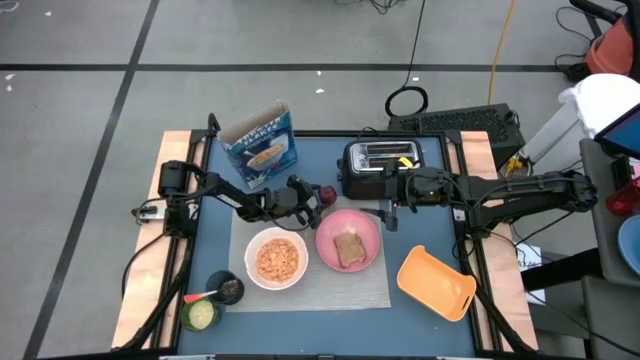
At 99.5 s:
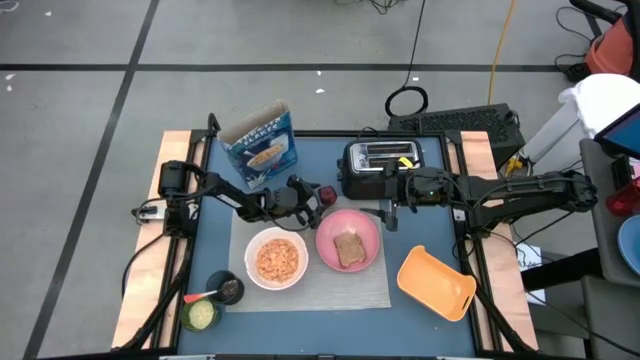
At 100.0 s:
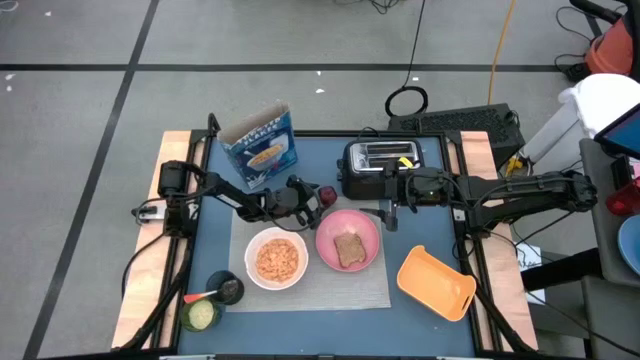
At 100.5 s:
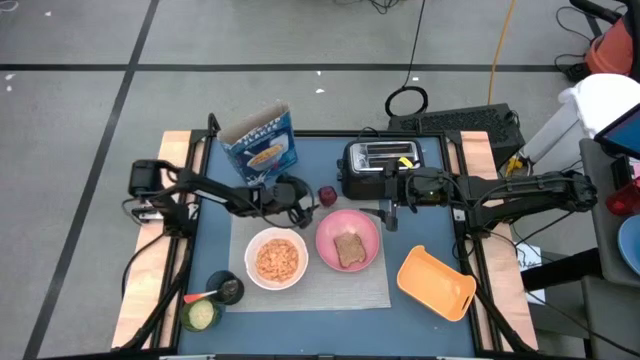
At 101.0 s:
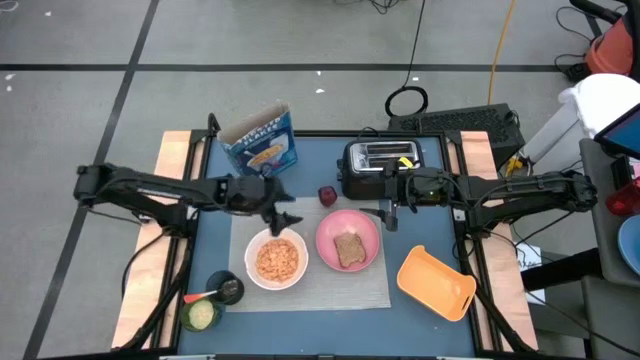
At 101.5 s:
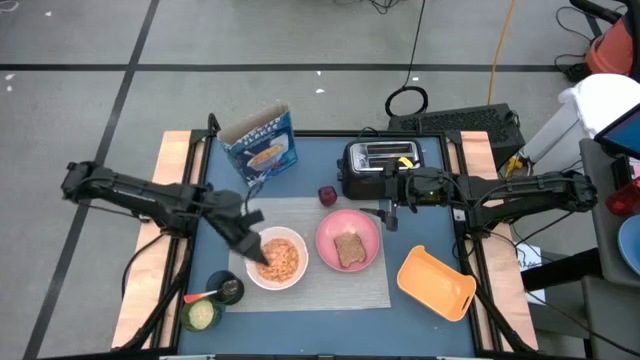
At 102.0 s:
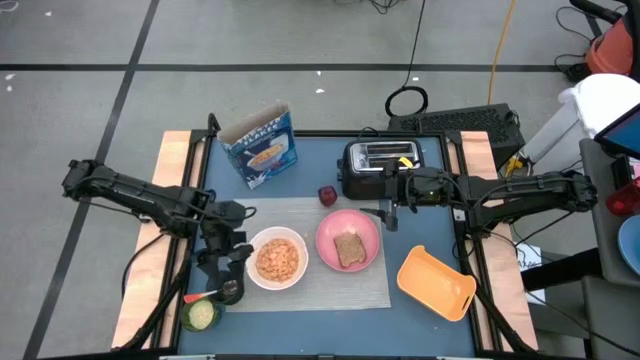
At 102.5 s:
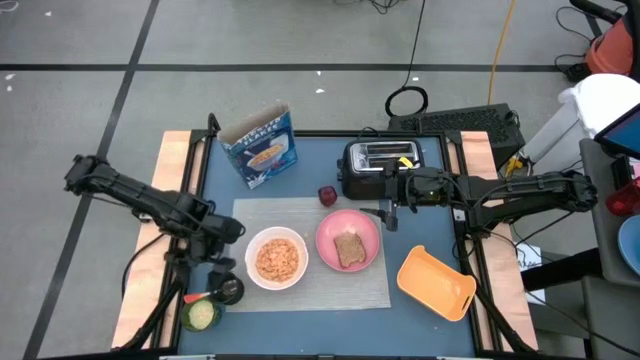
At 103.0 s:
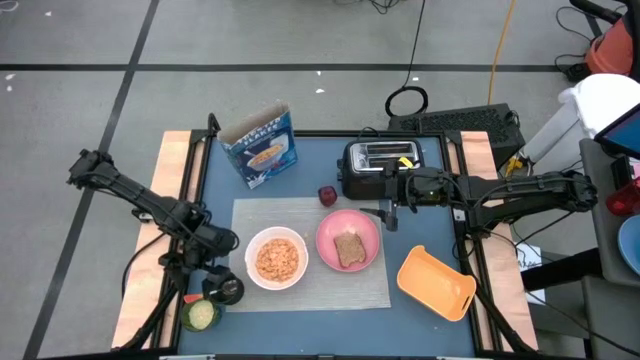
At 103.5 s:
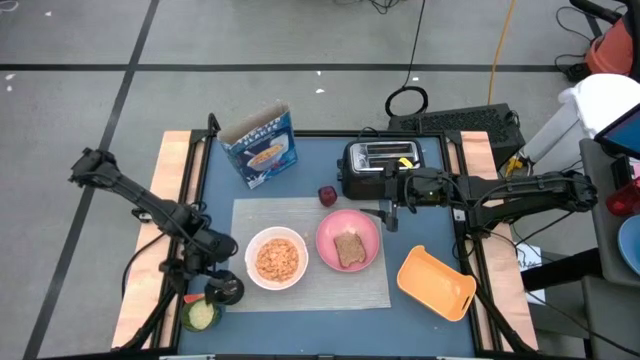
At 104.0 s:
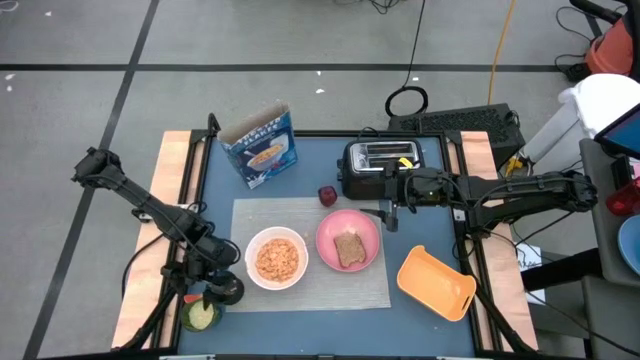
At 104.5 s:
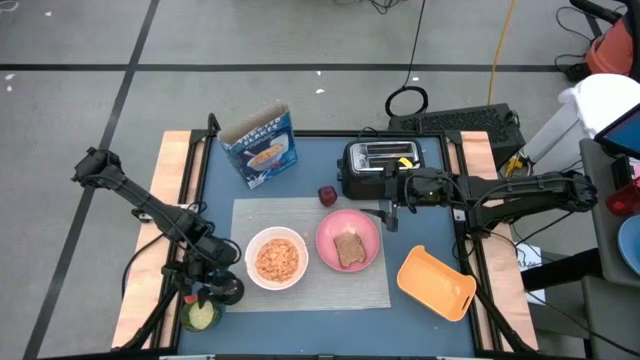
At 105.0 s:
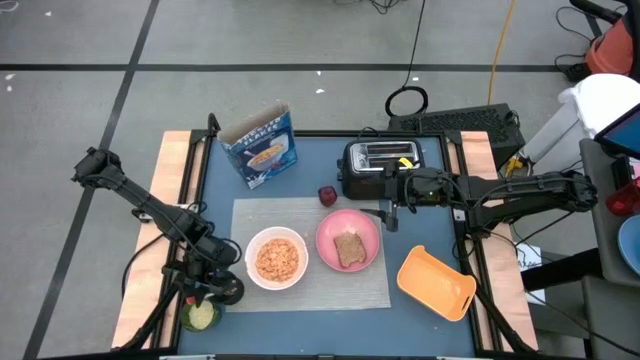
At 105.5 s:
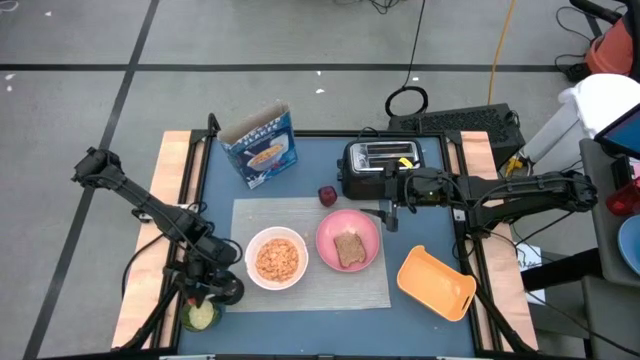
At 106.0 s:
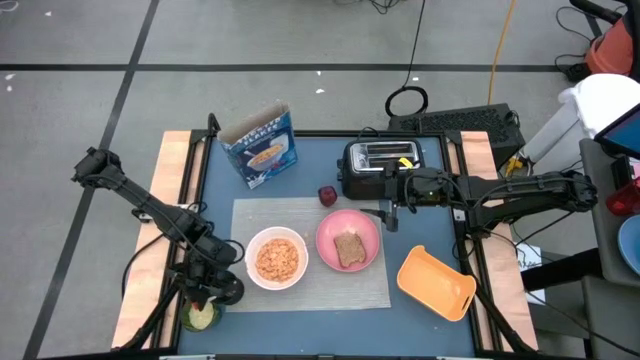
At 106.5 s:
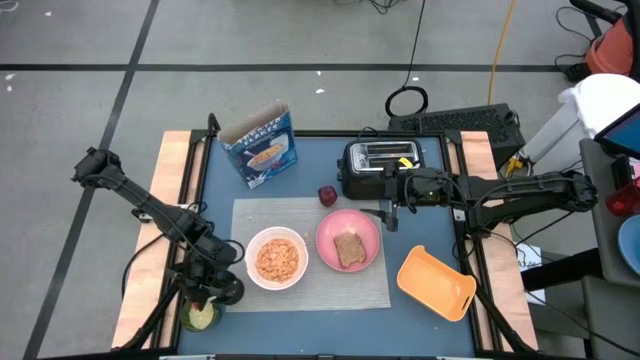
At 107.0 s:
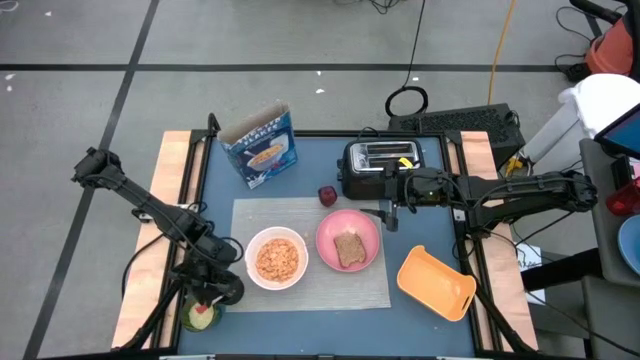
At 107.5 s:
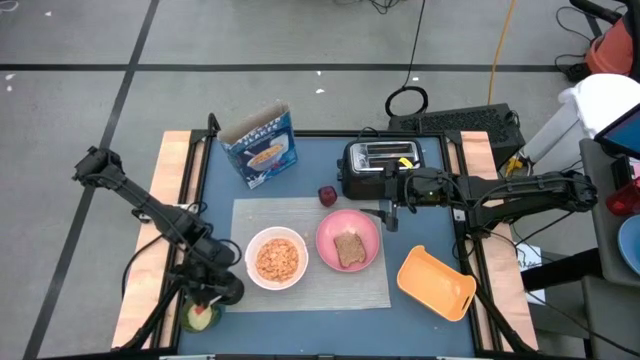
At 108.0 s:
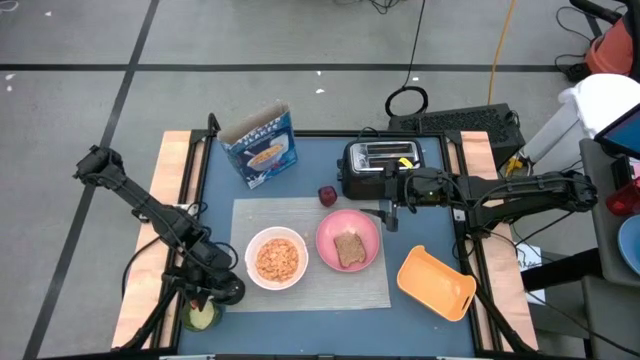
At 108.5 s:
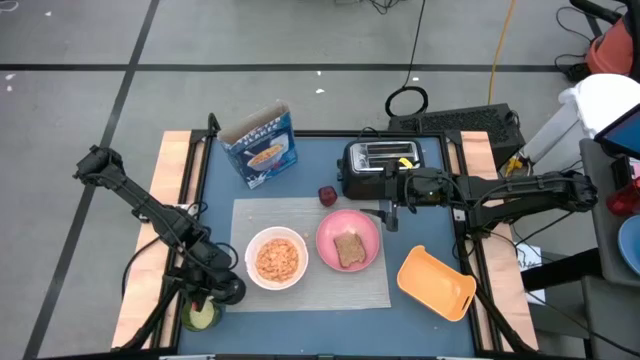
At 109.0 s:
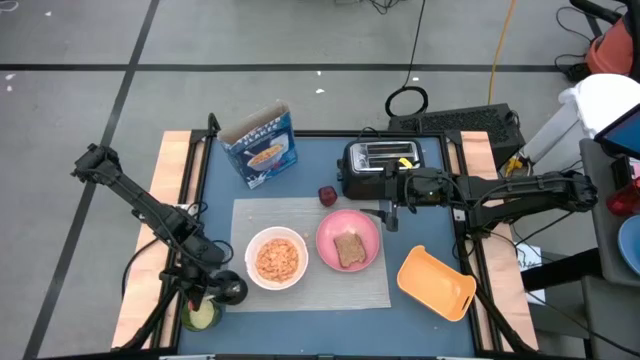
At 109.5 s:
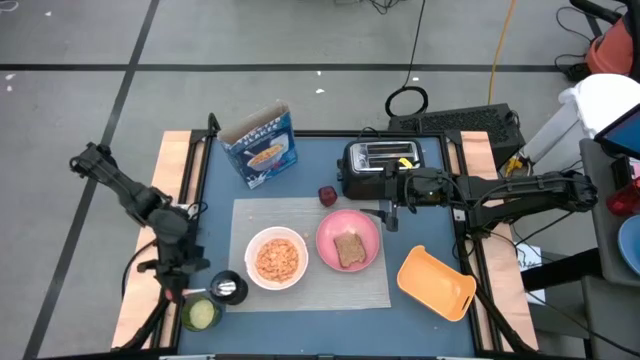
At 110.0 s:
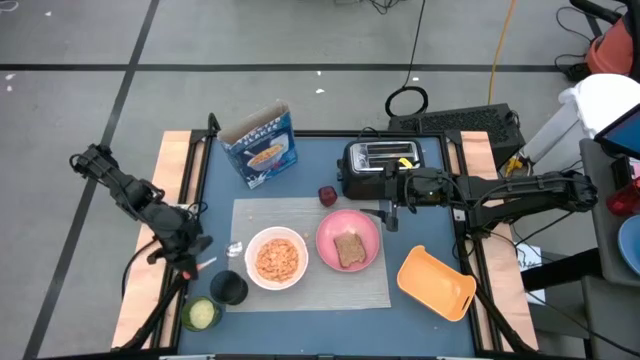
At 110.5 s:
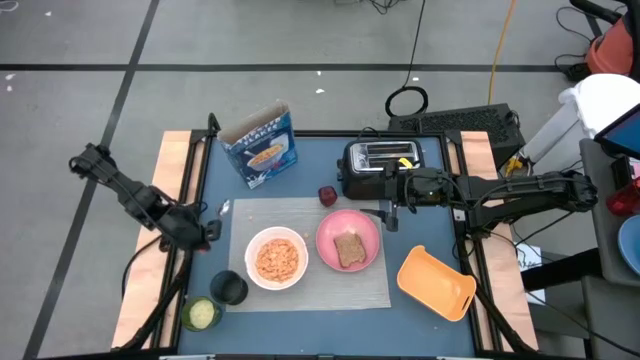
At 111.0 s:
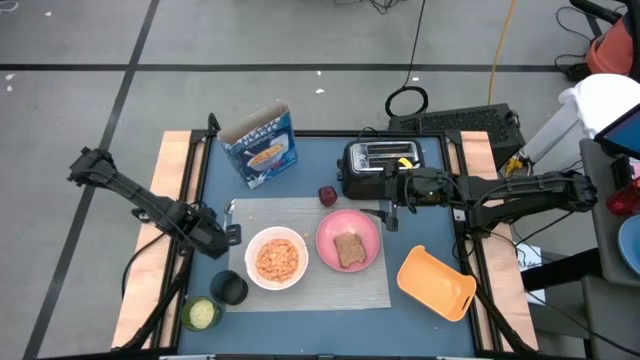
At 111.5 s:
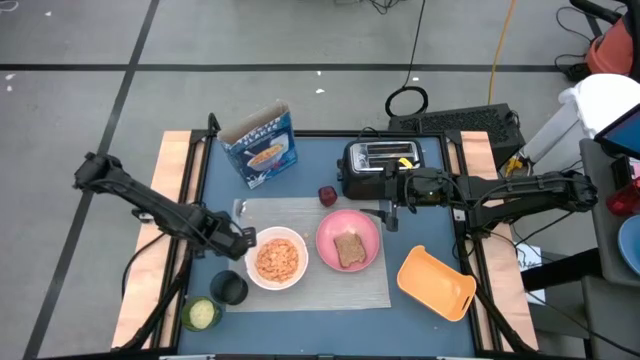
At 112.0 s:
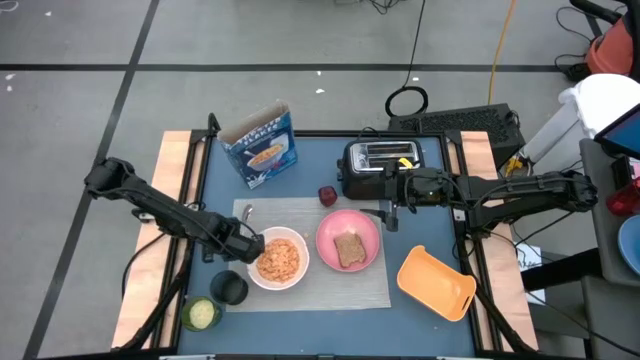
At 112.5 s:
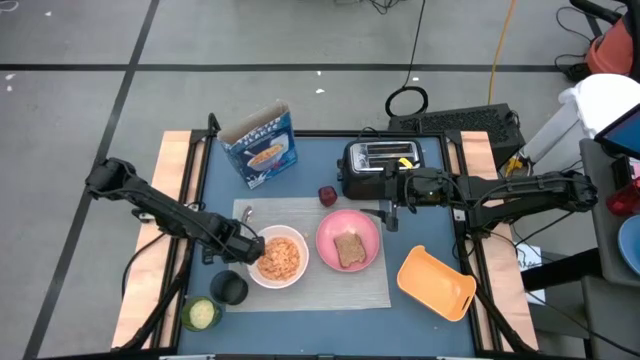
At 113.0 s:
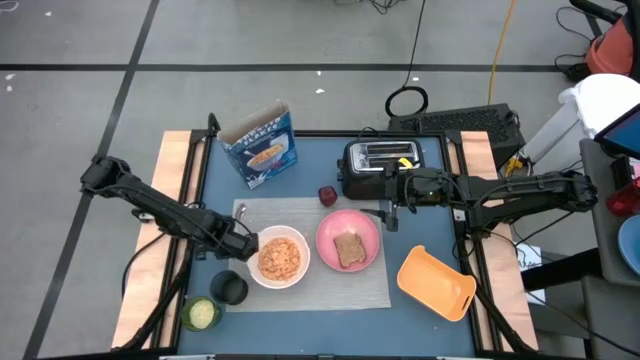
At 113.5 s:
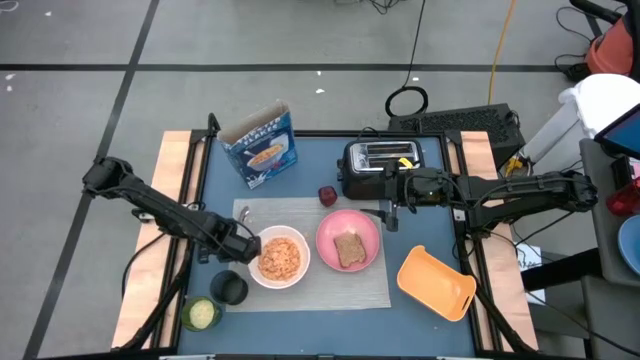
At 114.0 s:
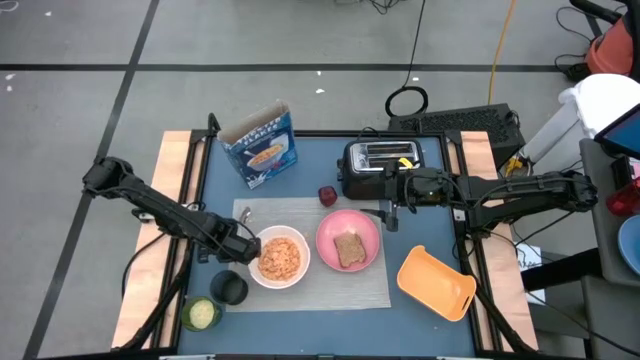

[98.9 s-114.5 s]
Task: Arrange a breakfast setting
Put the orange spoon on the mat

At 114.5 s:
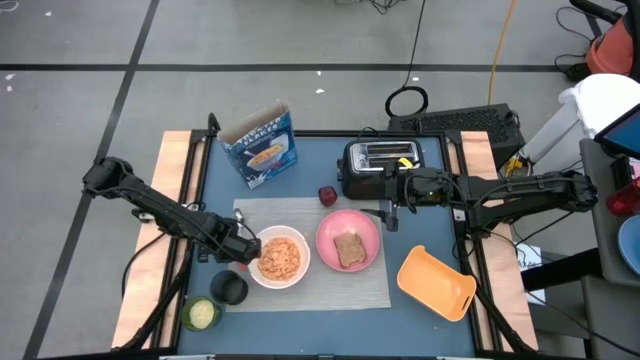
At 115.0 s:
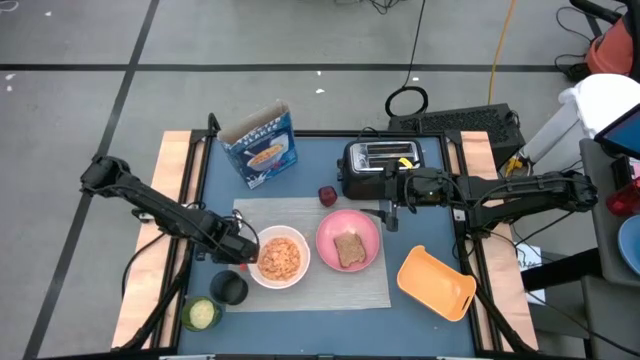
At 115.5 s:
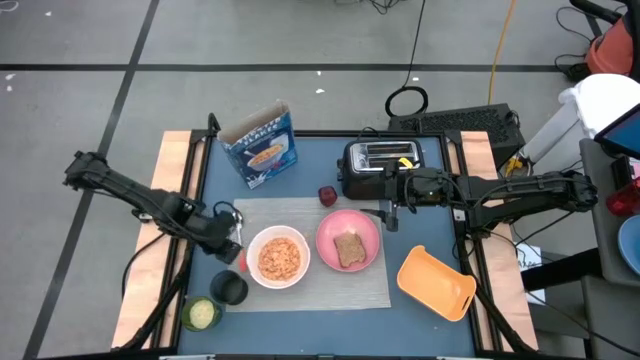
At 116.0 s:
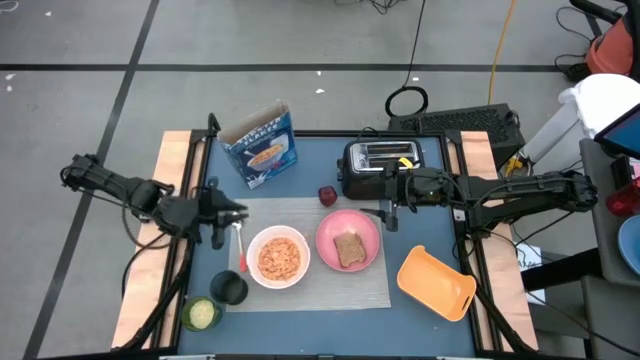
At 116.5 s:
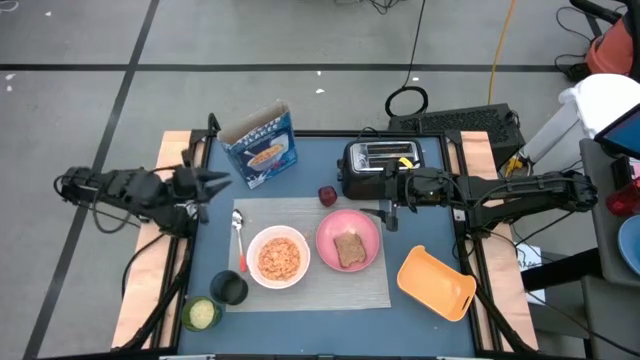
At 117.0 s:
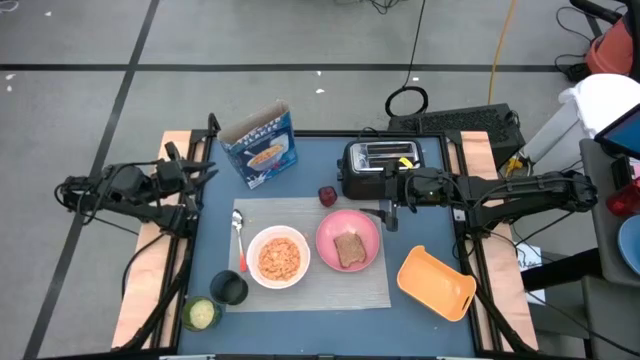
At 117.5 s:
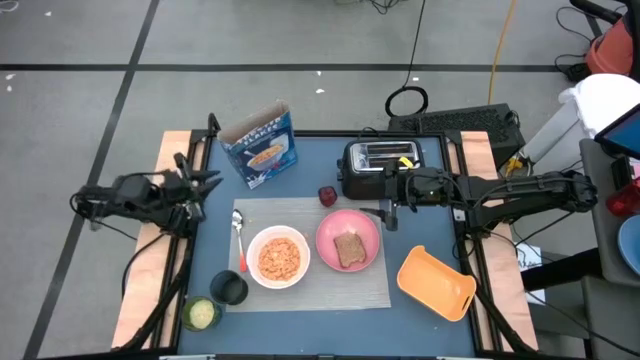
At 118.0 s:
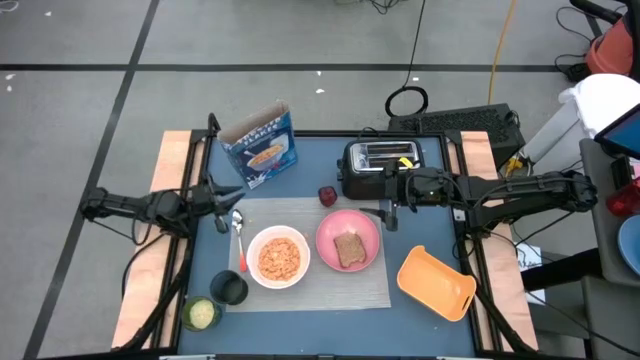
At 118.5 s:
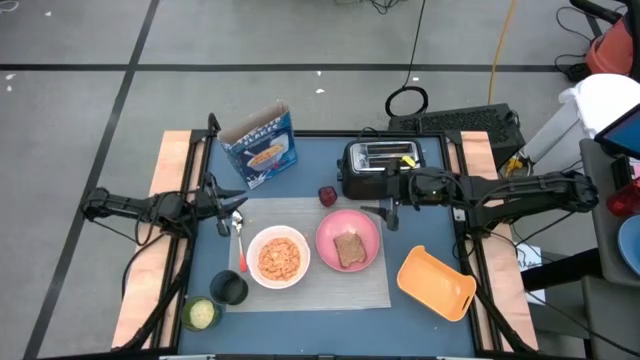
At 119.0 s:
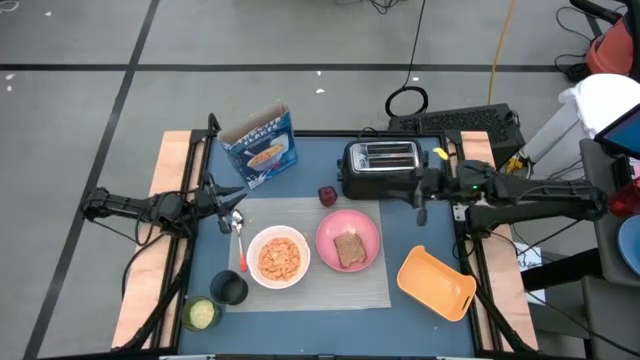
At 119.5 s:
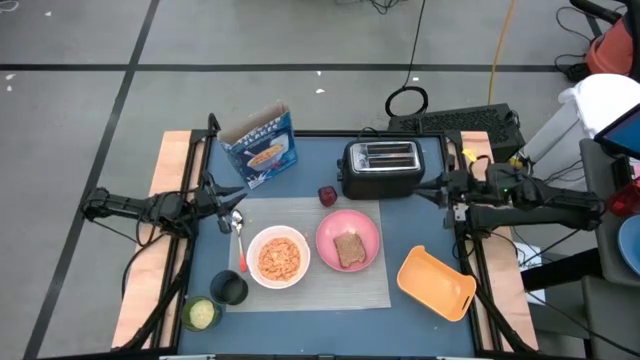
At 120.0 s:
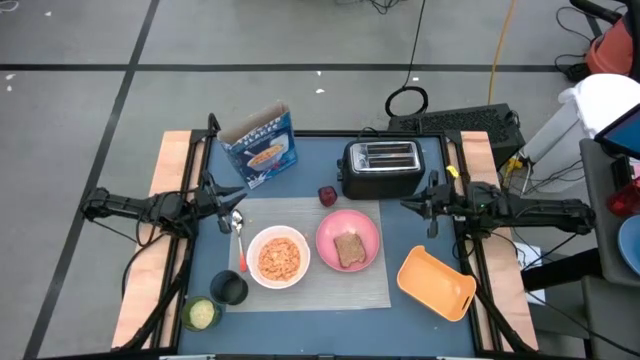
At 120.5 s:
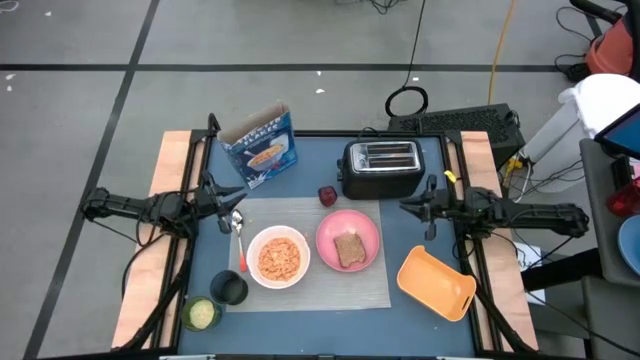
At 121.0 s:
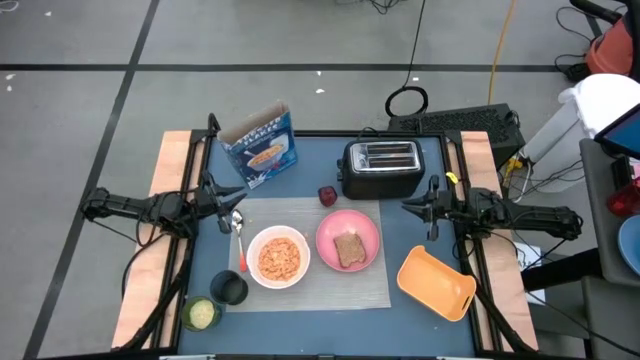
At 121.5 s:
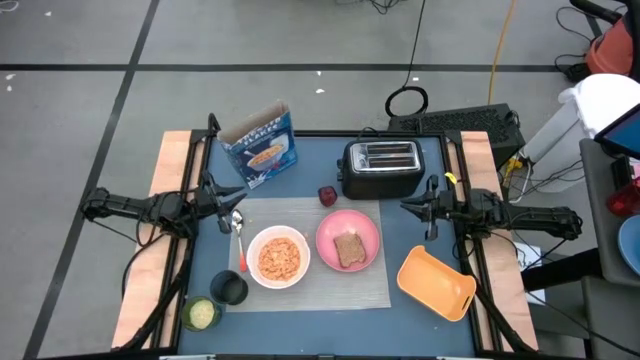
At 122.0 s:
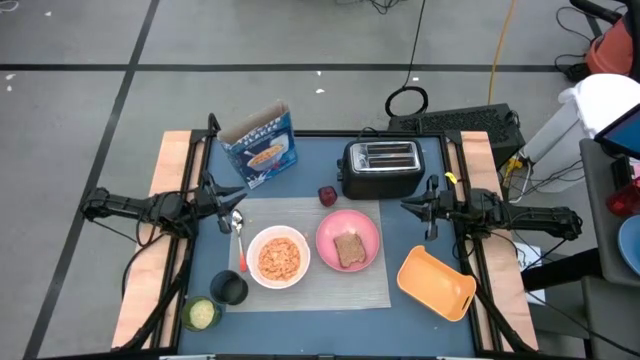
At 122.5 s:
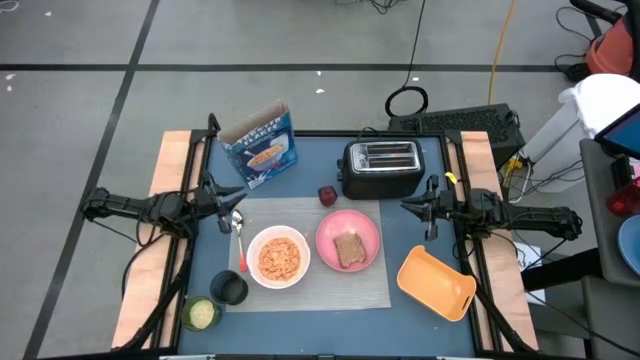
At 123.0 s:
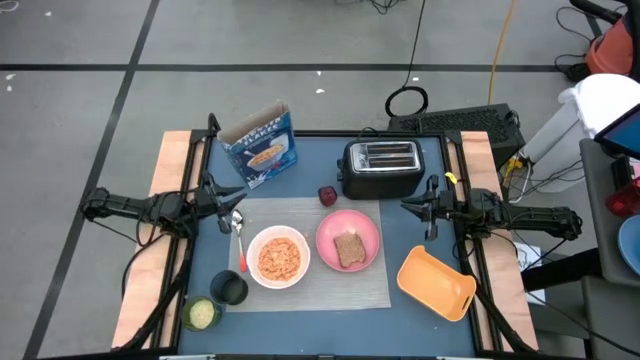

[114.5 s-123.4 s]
Return to Home Position
